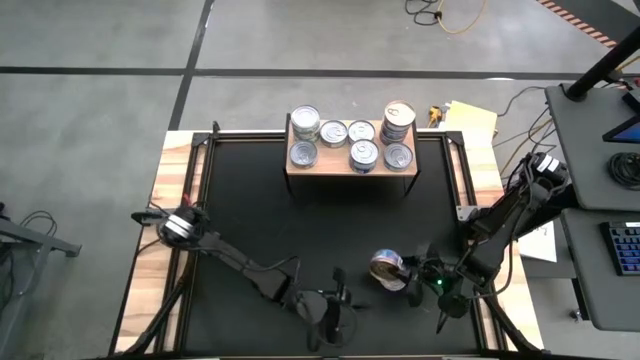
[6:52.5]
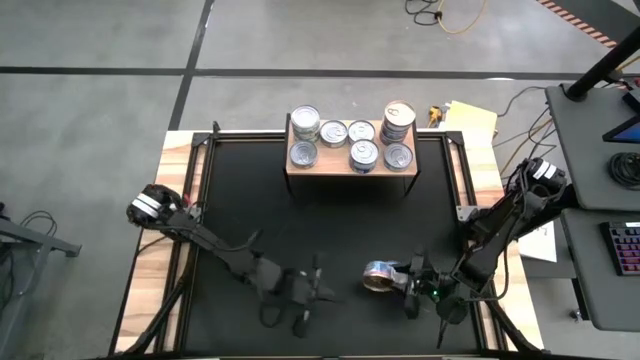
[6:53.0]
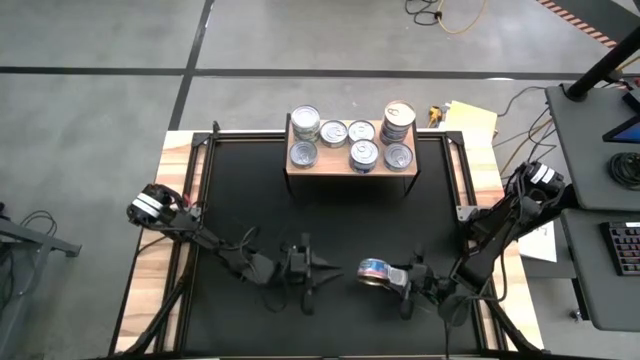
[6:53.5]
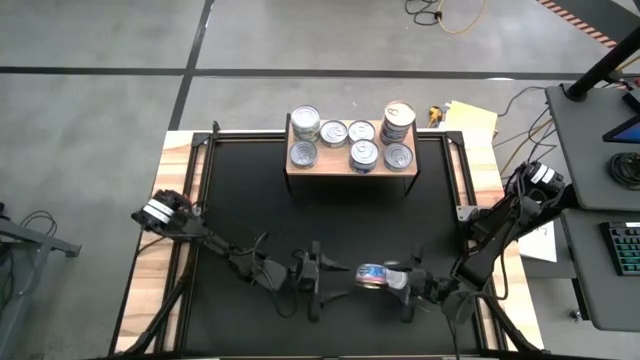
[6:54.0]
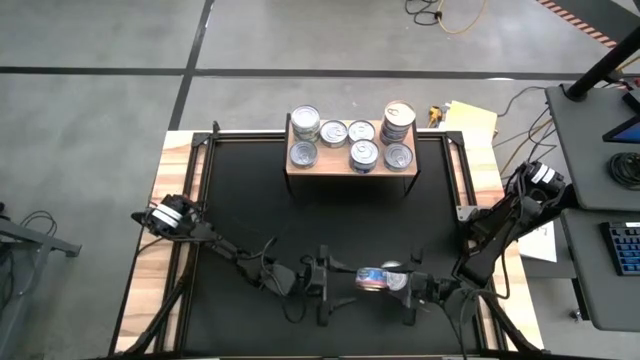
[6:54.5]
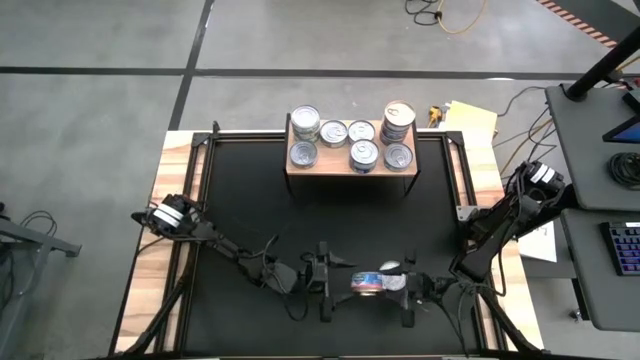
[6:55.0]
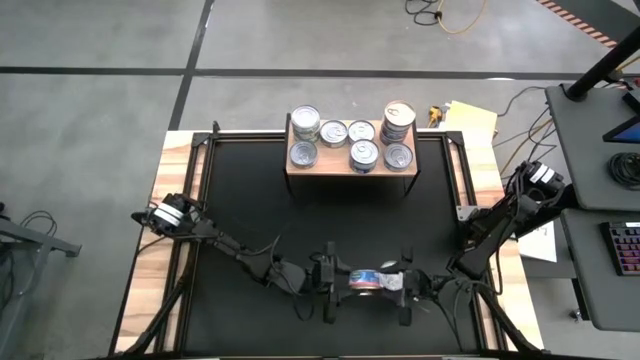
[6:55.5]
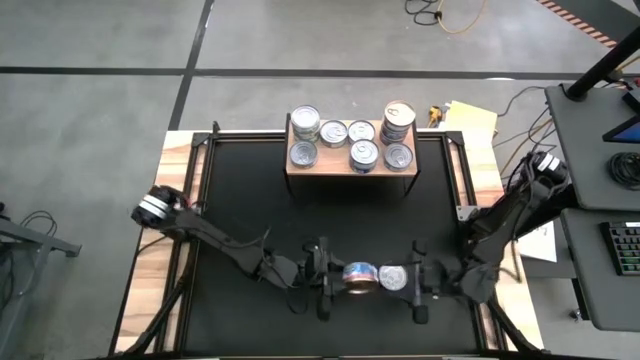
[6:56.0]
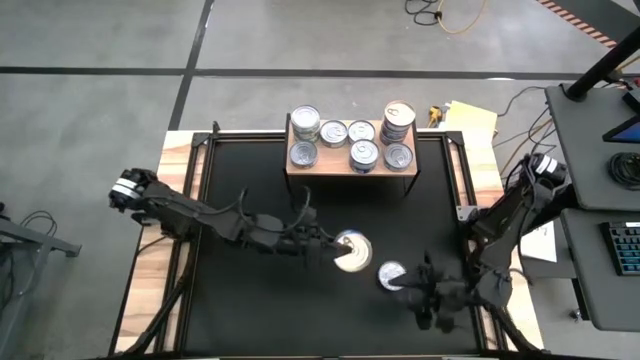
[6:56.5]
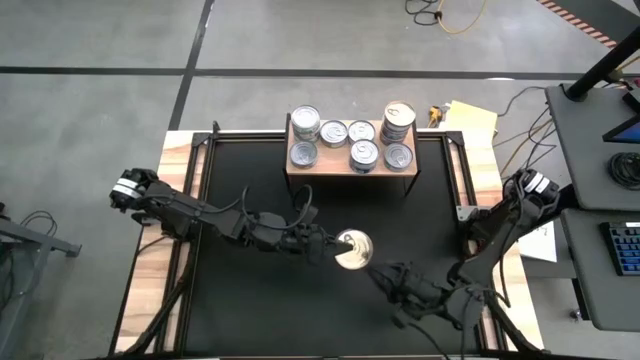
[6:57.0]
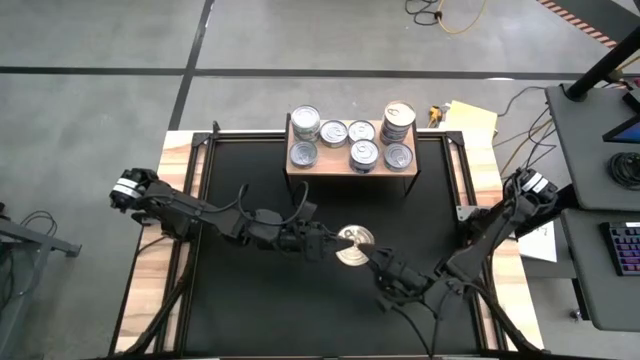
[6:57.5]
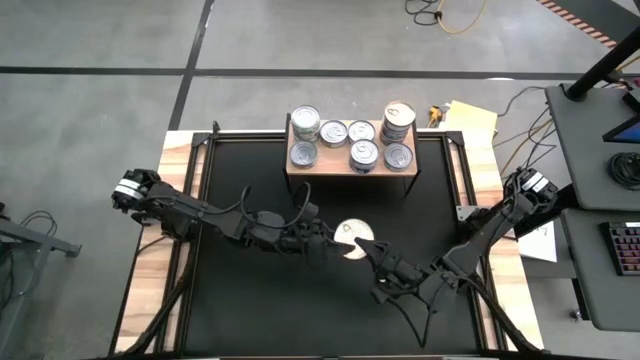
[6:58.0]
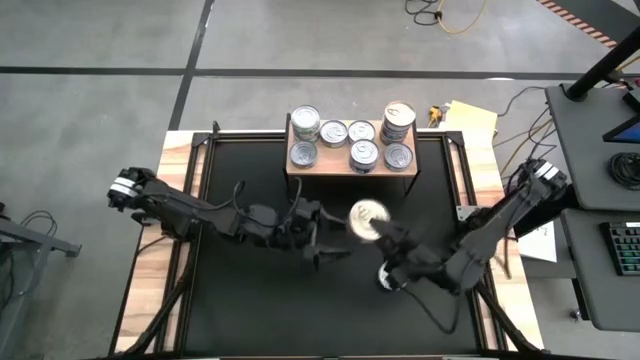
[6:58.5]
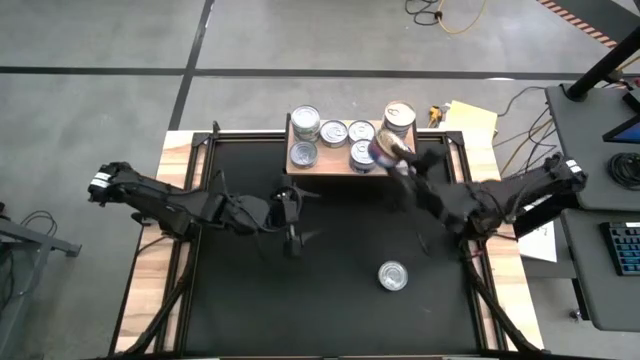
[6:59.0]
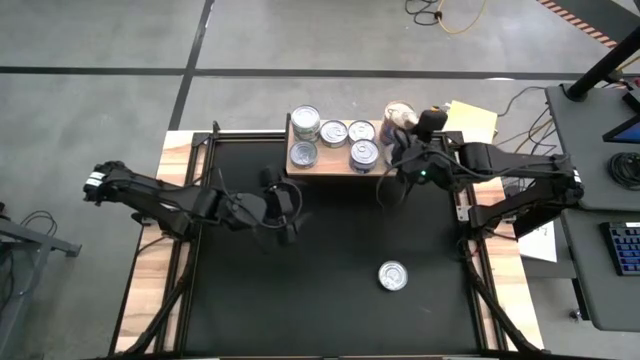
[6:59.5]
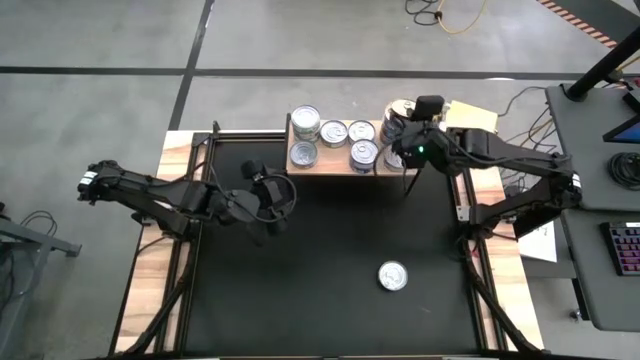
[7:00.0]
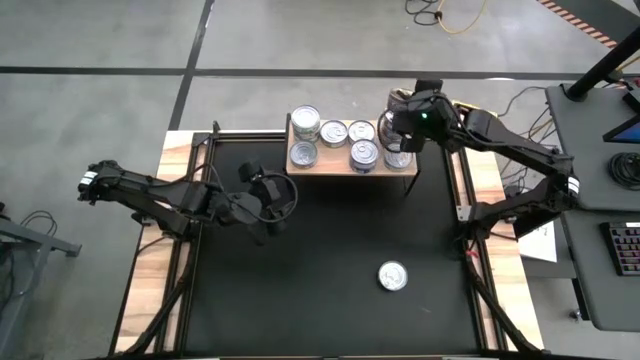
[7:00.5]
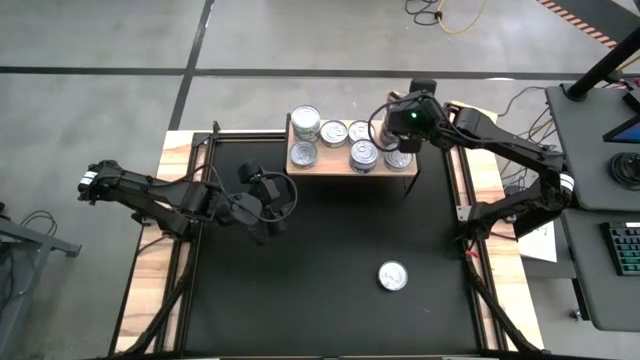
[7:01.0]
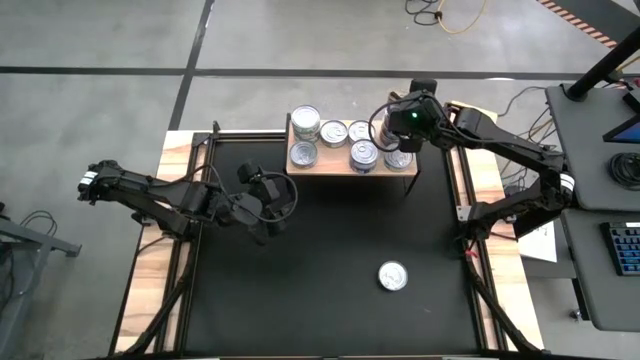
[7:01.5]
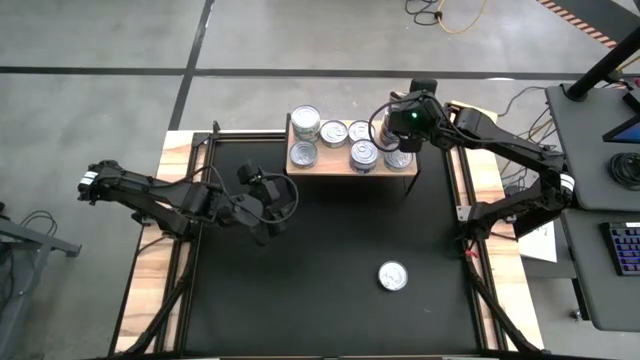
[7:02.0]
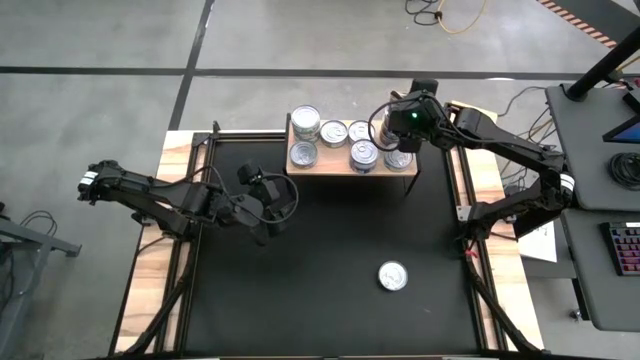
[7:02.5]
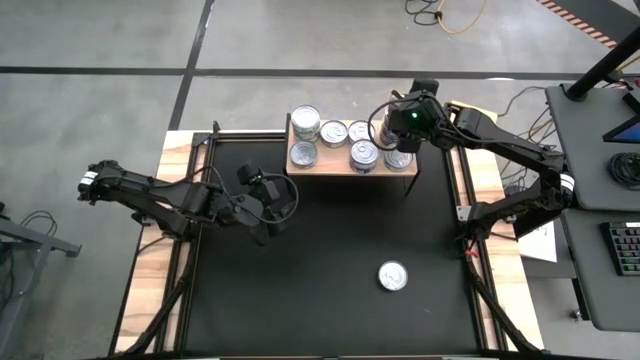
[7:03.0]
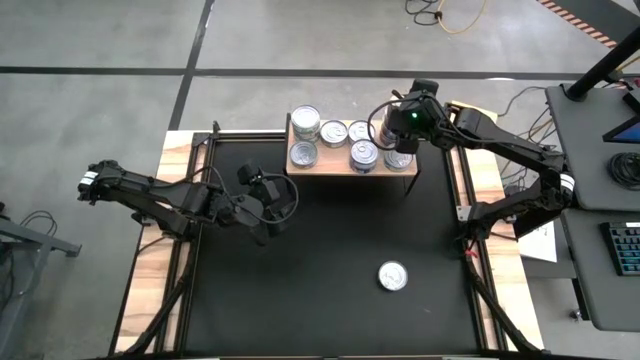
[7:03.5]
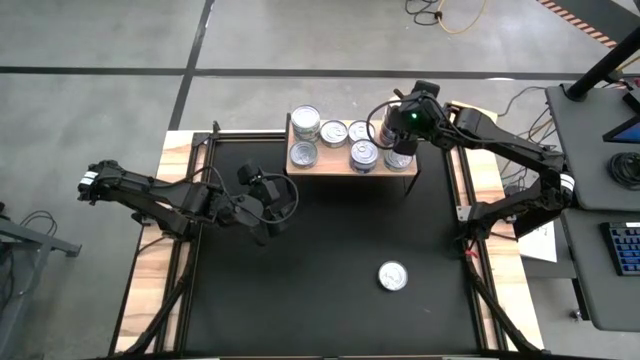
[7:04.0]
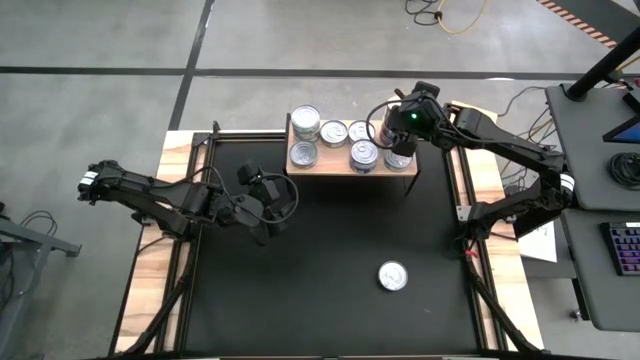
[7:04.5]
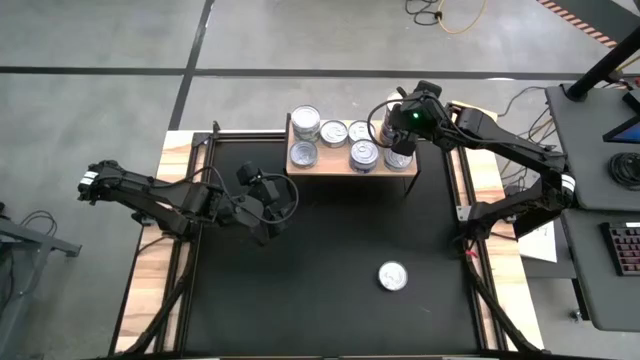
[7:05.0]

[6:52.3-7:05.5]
Task: Stack canned seafood by type on shelf
Stack the blue pink tuna can on top of the blue pink tuna can on the shelf

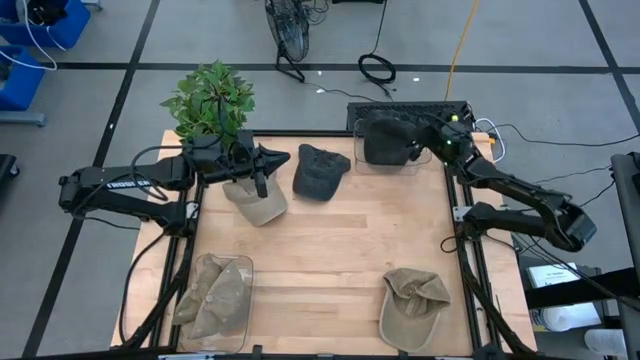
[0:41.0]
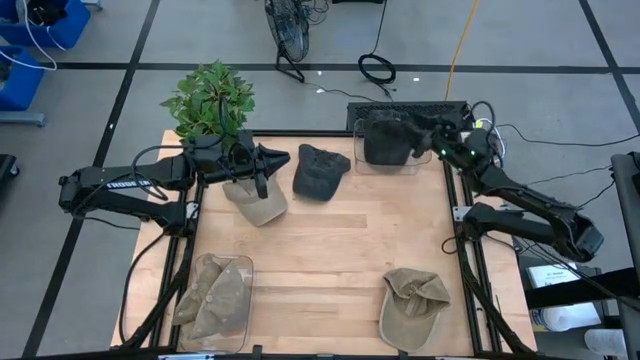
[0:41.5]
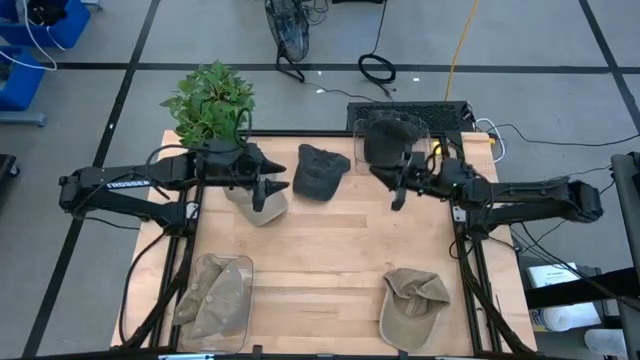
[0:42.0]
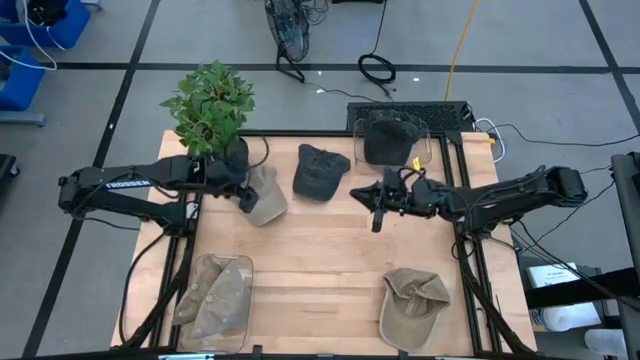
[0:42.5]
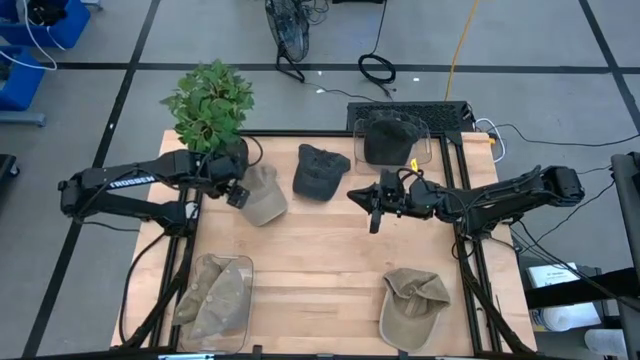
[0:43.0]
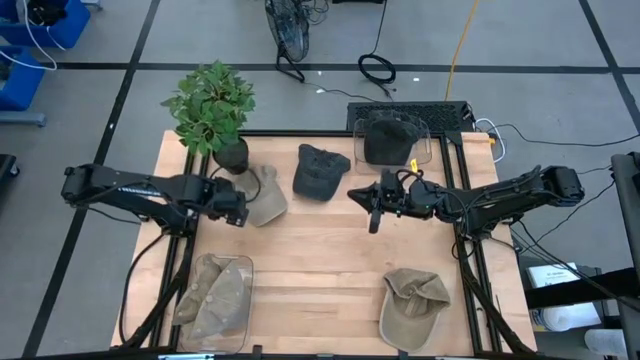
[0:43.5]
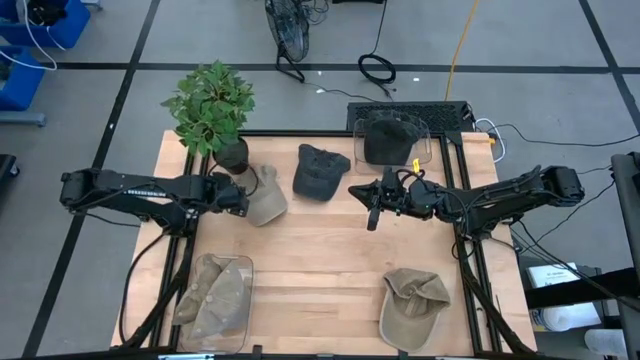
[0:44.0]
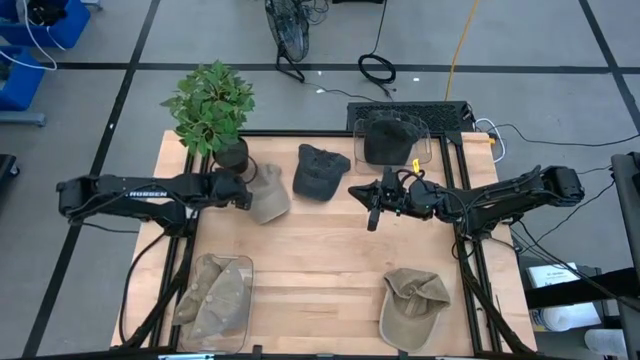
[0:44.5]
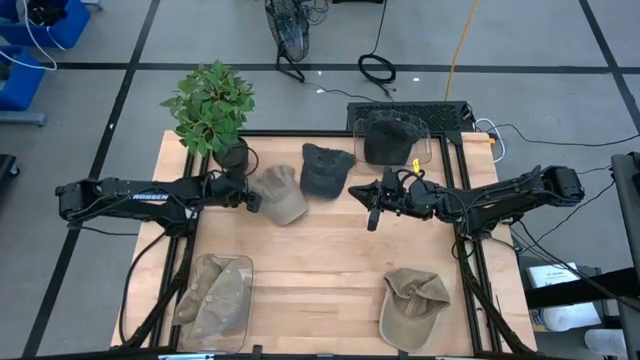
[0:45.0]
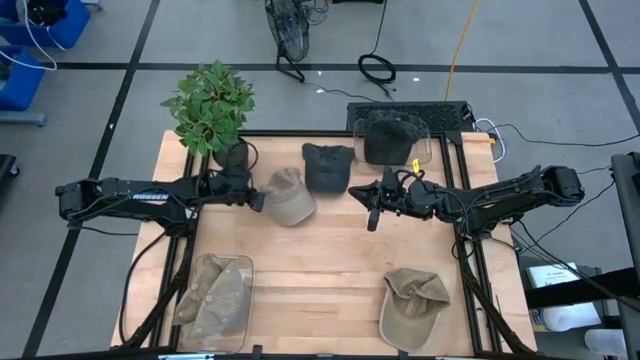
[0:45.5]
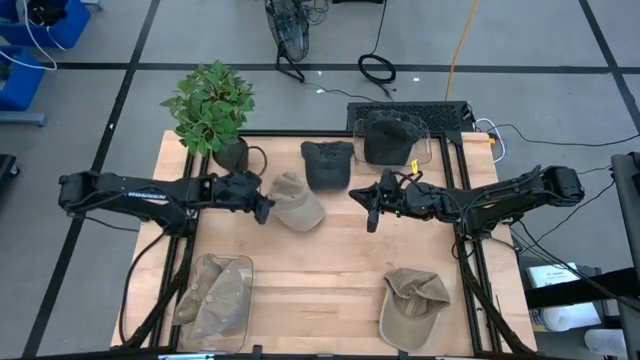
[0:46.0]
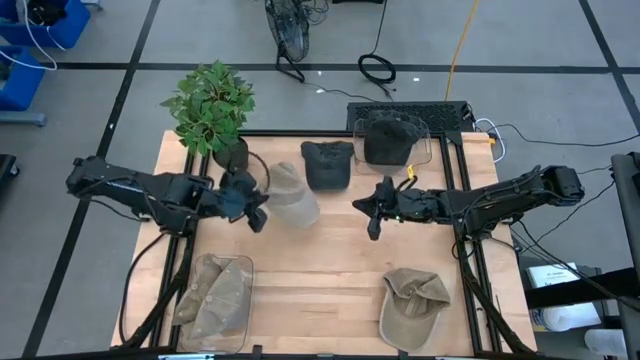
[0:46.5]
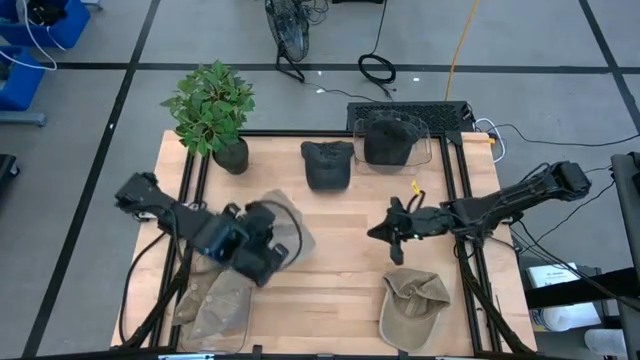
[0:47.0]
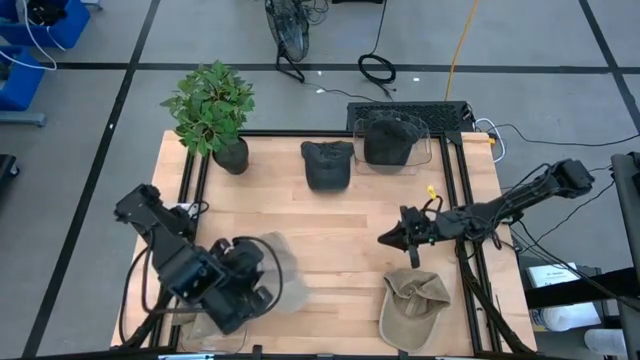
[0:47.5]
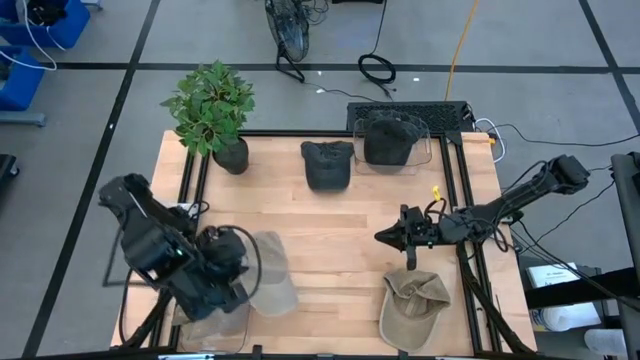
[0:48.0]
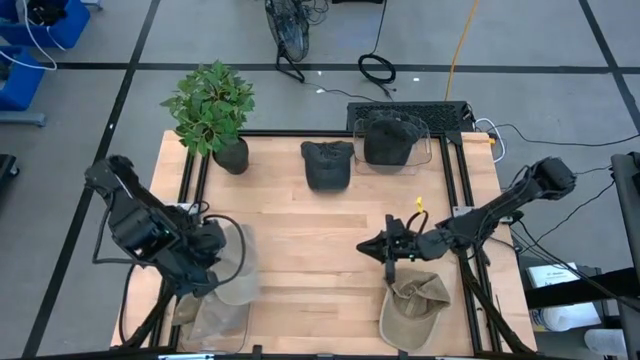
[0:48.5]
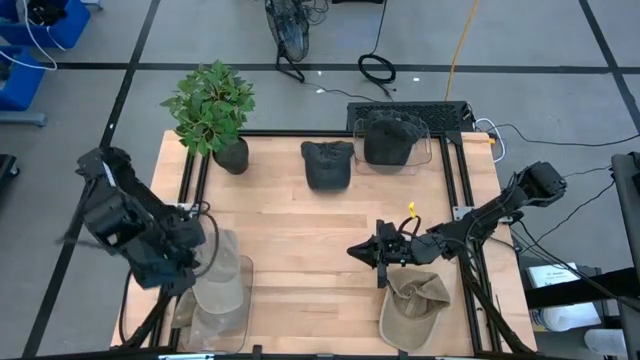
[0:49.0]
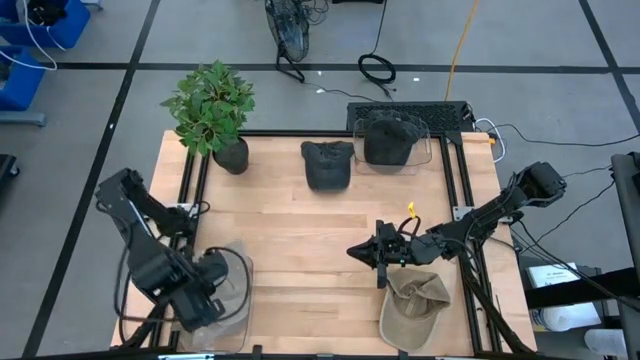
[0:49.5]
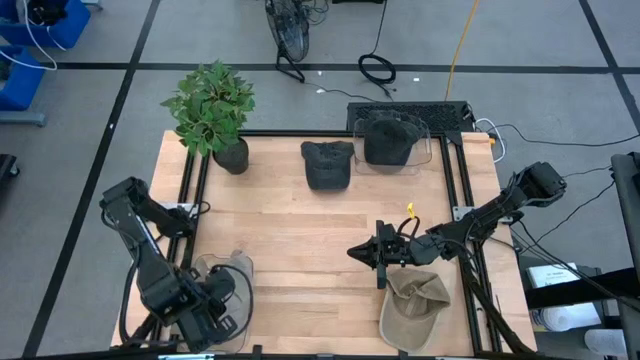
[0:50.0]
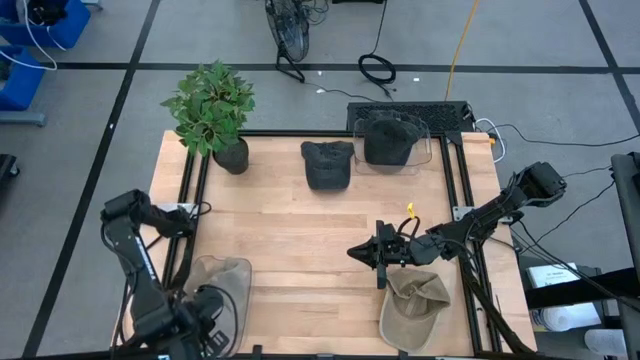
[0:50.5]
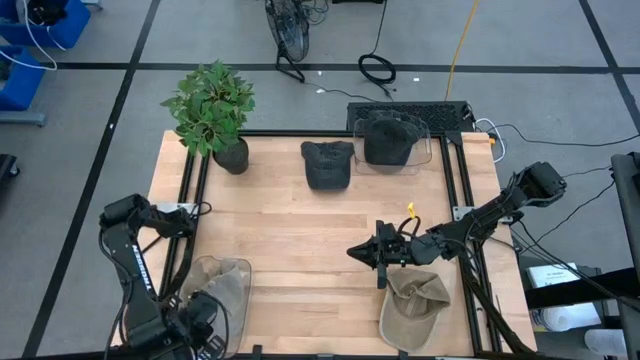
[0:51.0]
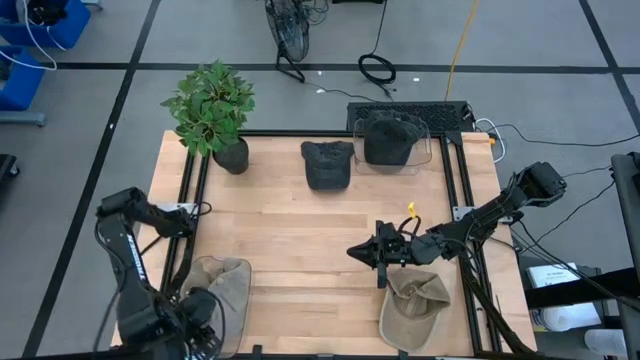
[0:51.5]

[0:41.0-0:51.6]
Task: Pick & Place hat
Put the brown cap into the bottom transparent bin
